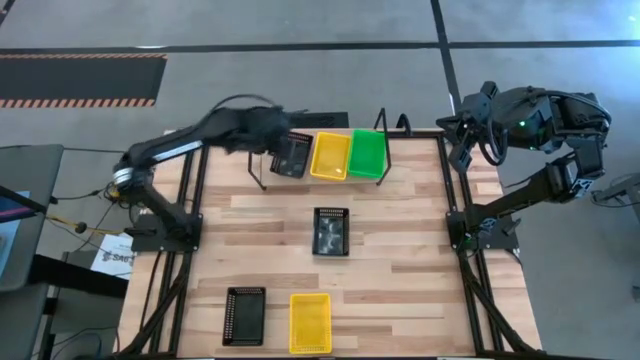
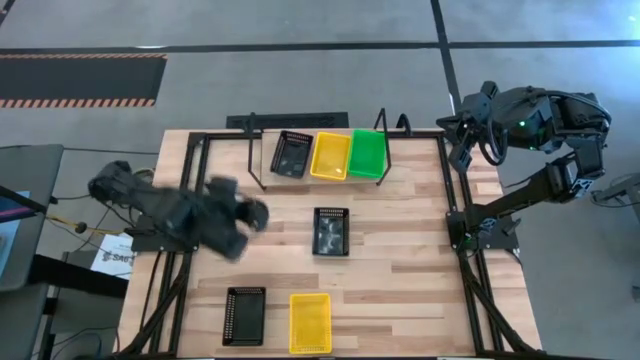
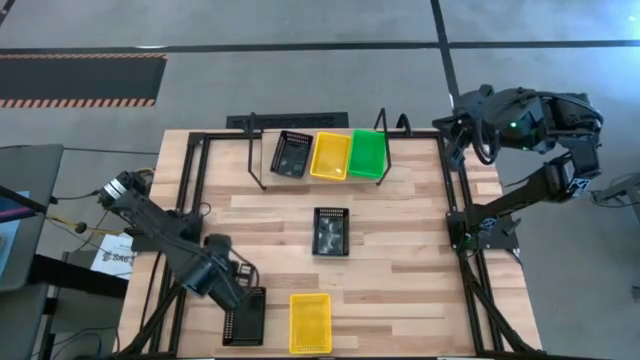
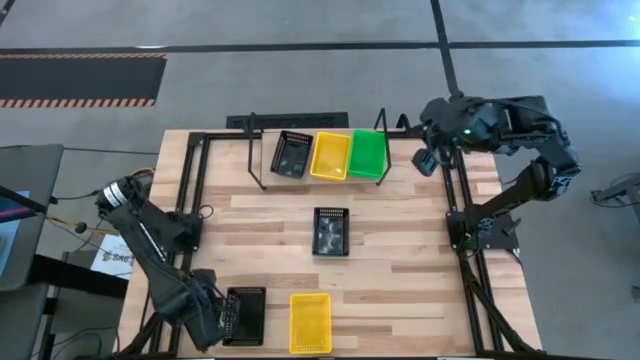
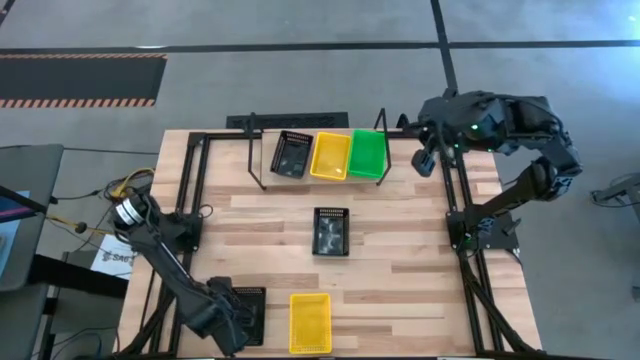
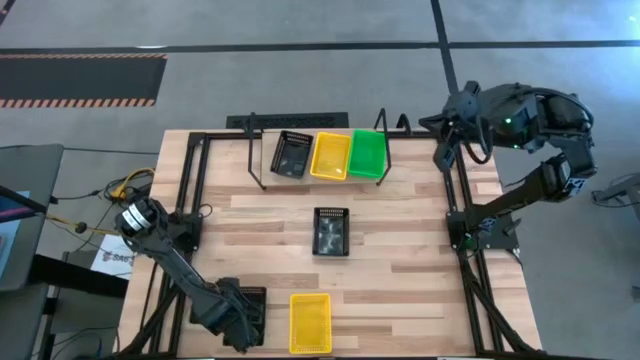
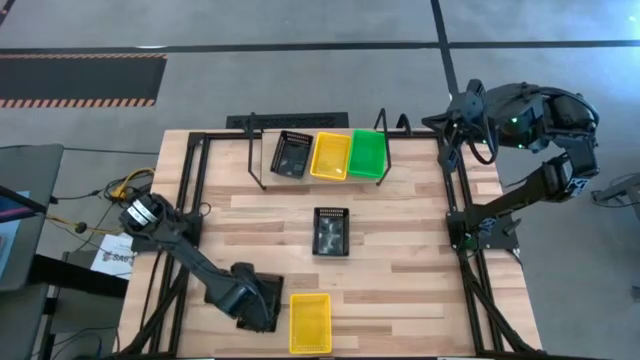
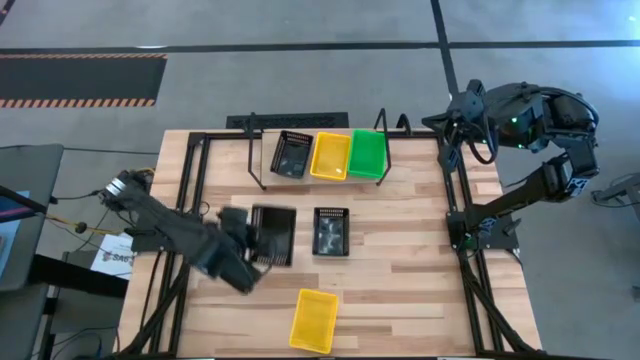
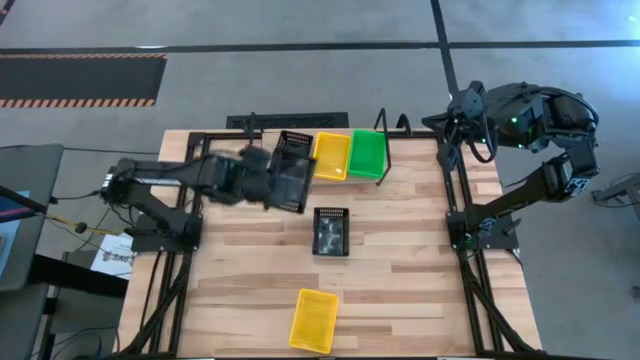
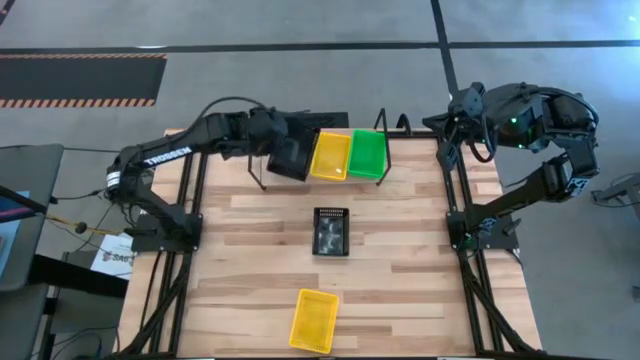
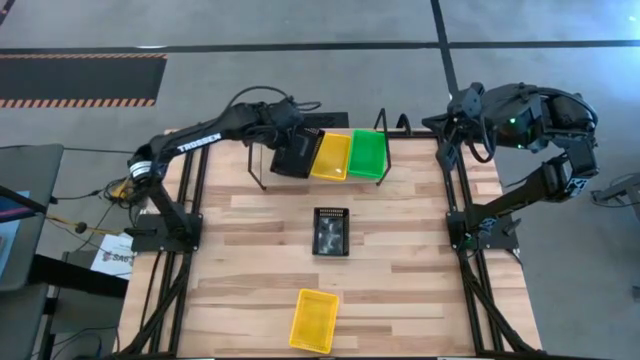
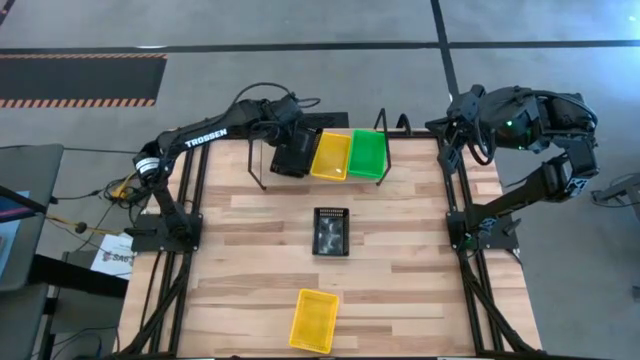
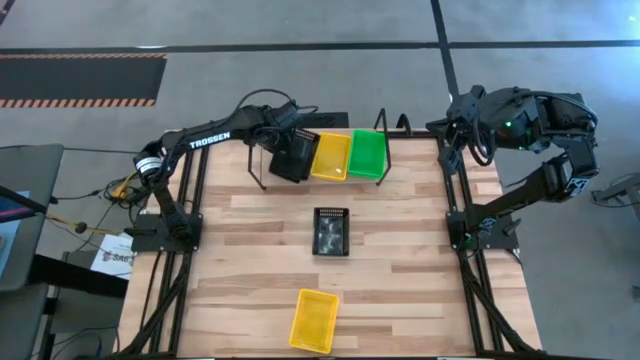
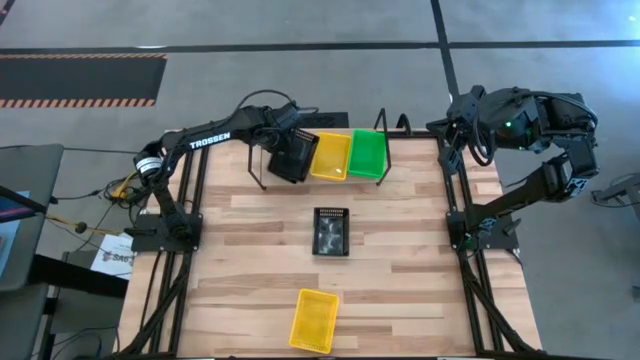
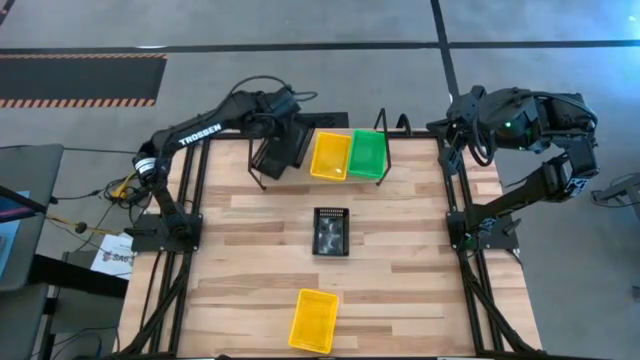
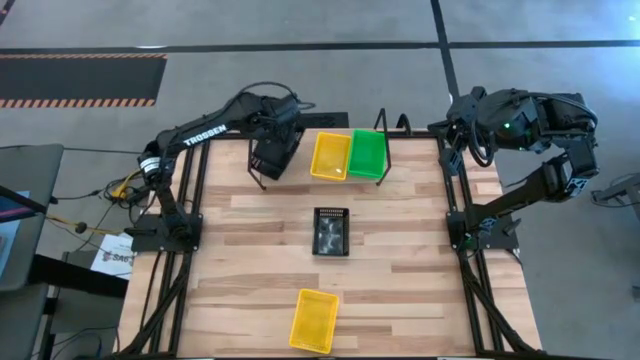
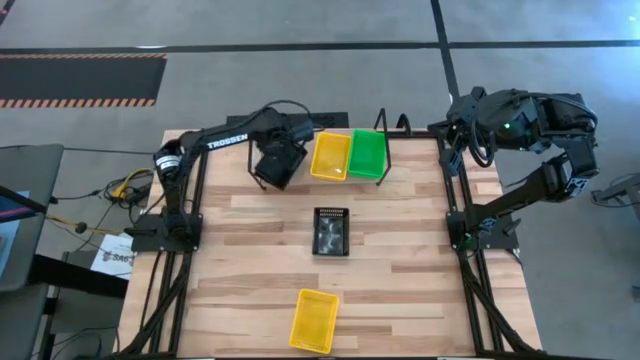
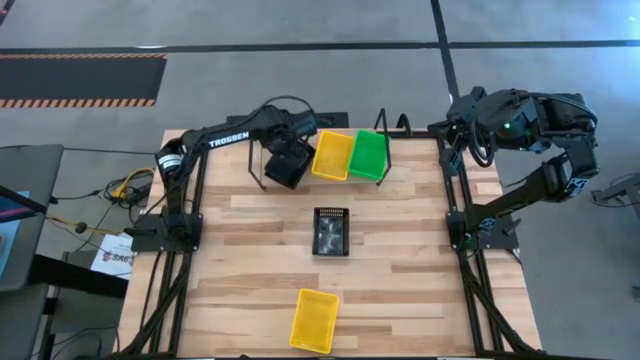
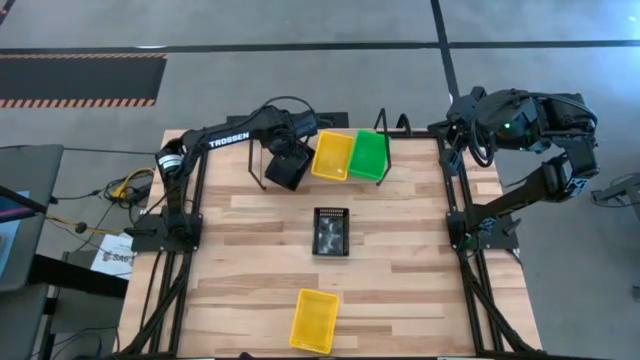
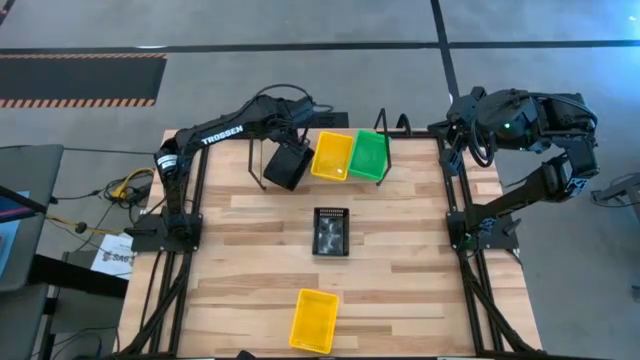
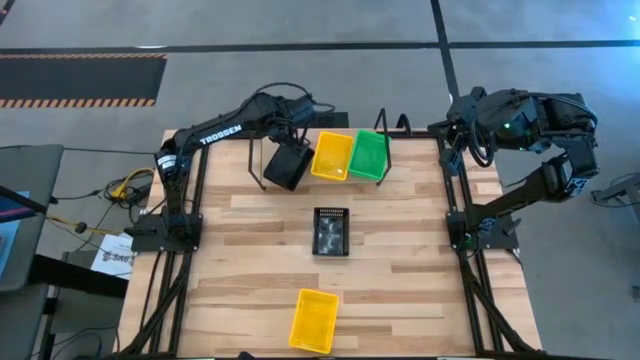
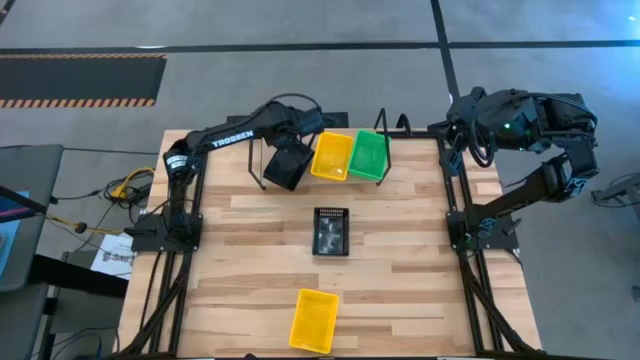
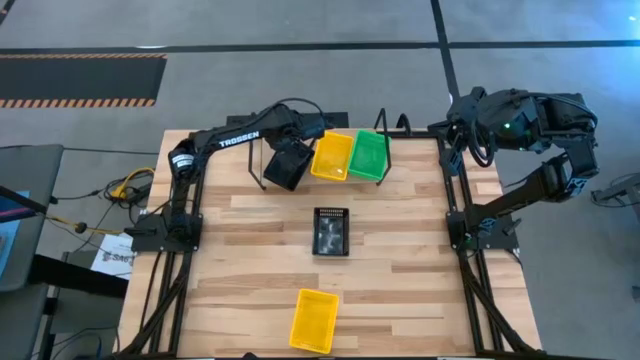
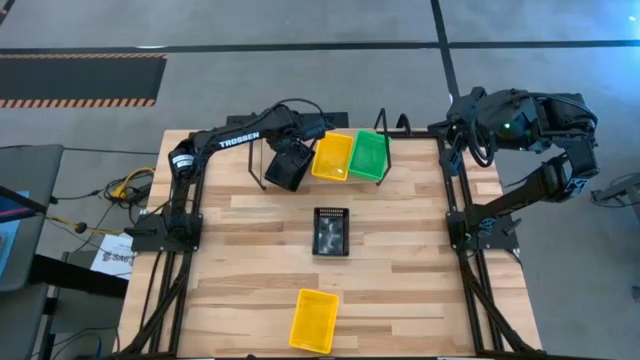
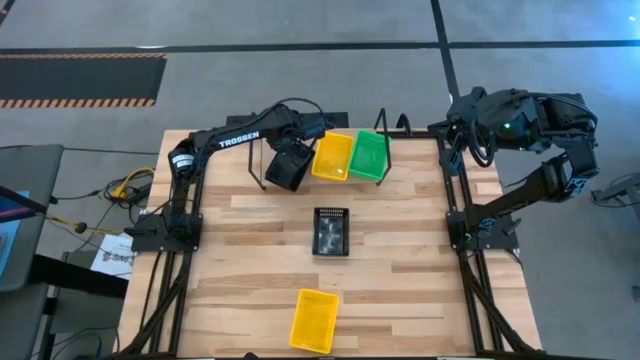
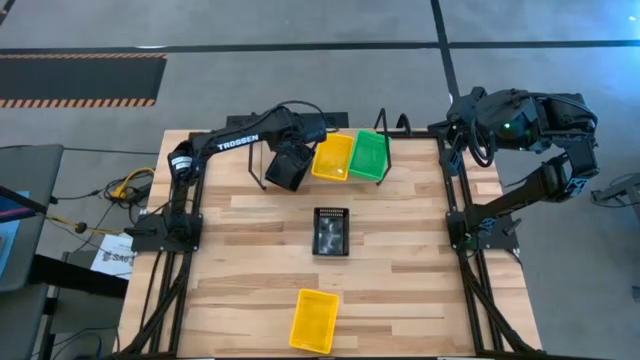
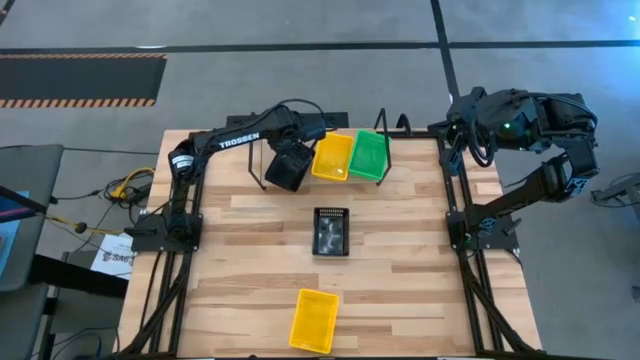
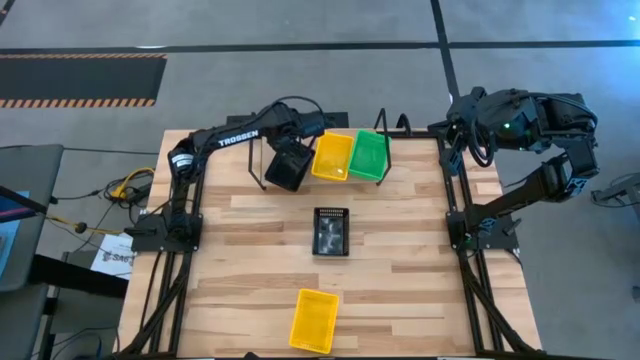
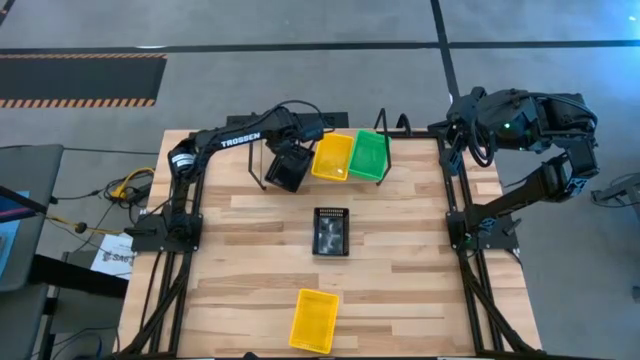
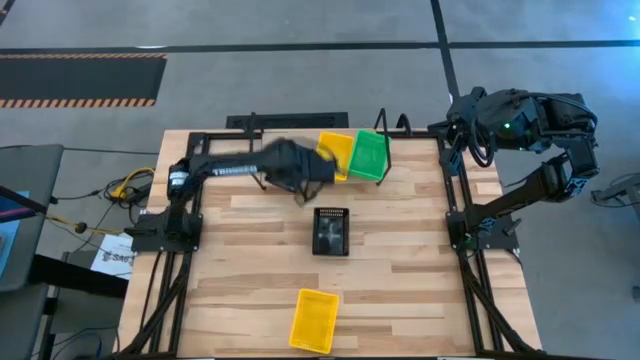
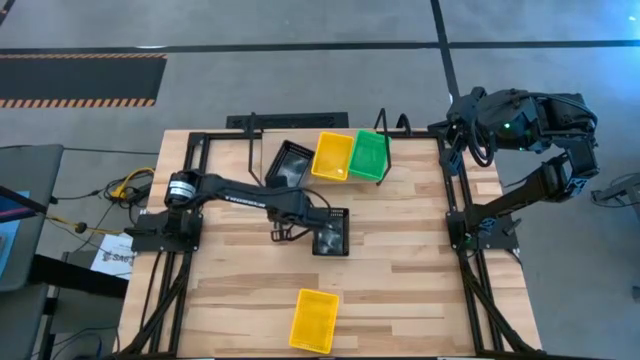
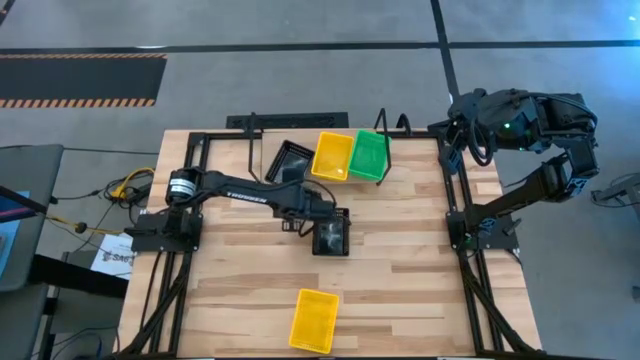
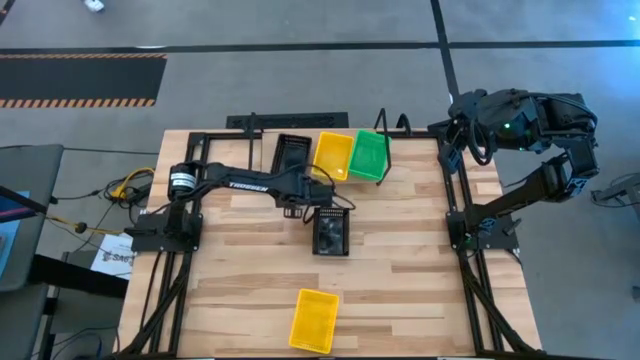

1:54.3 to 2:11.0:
Task: Stack baskets on shelf by color
Stack the bottom black bin on the black bin on the shelf

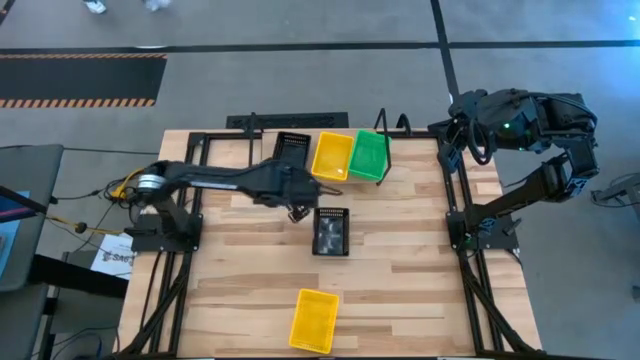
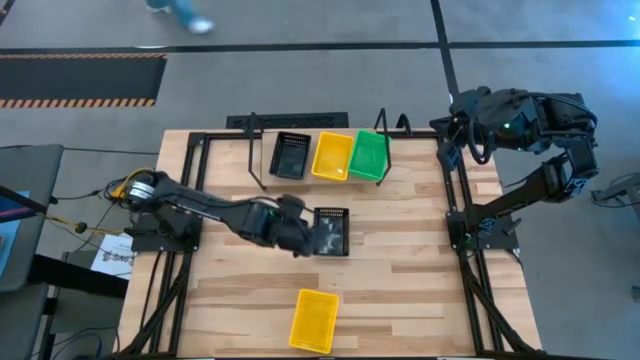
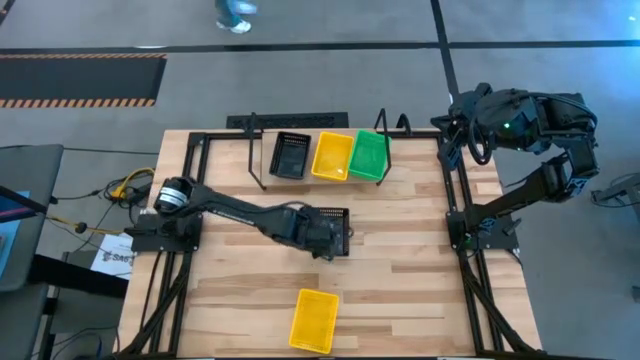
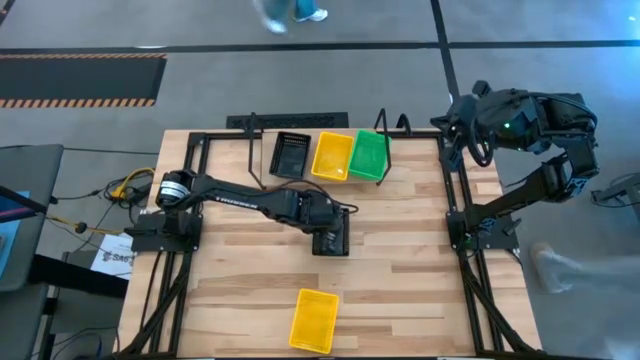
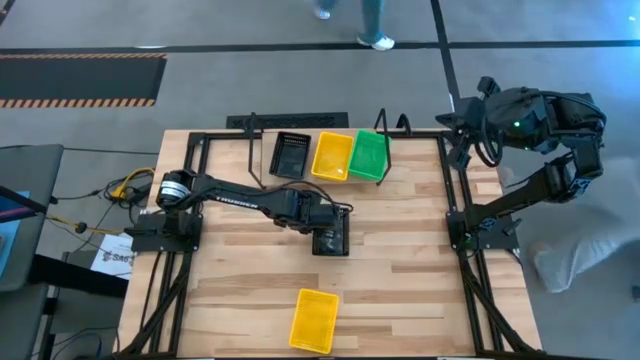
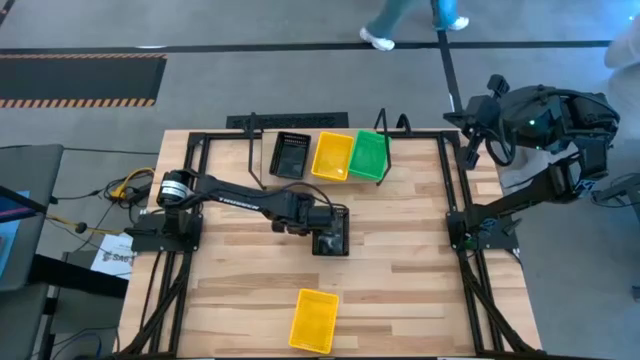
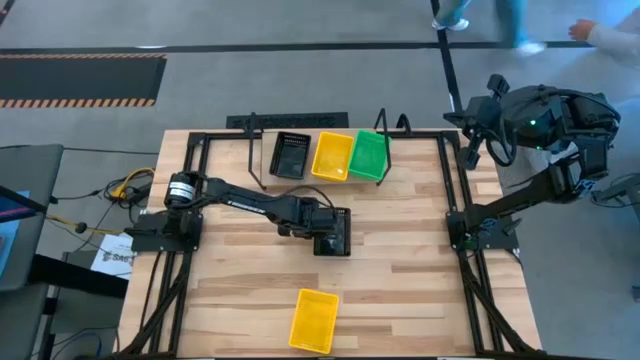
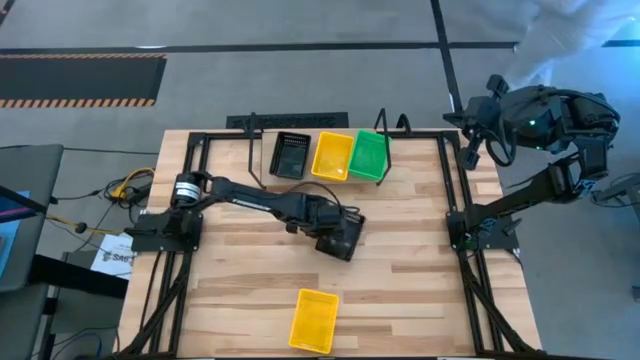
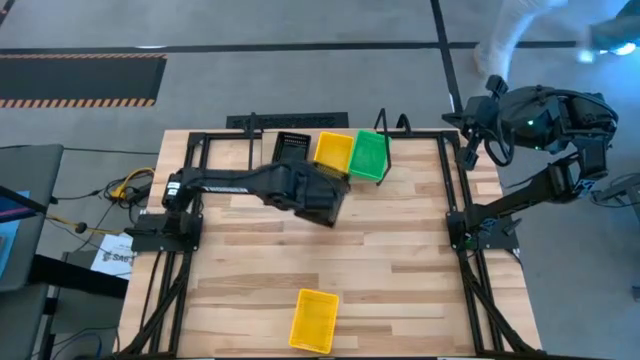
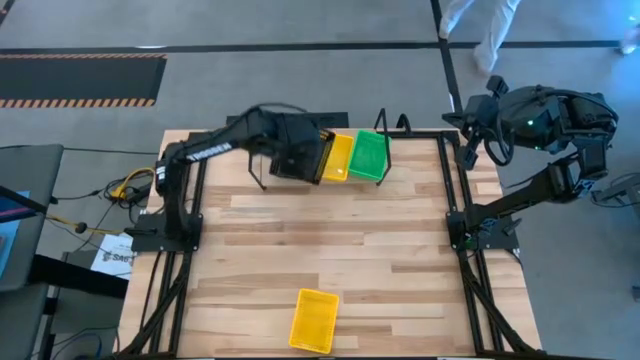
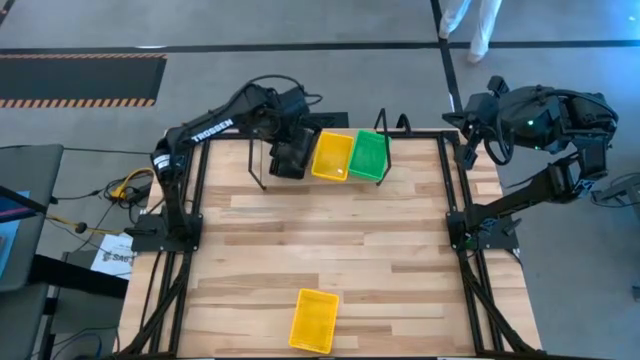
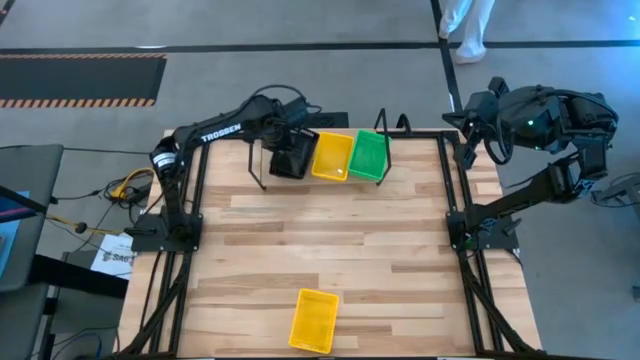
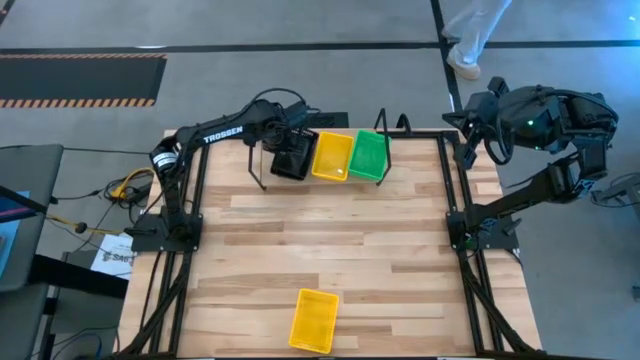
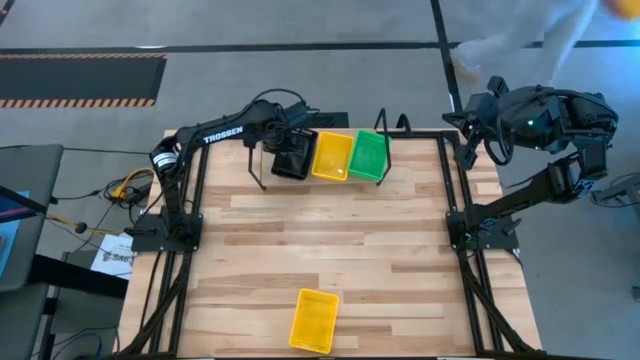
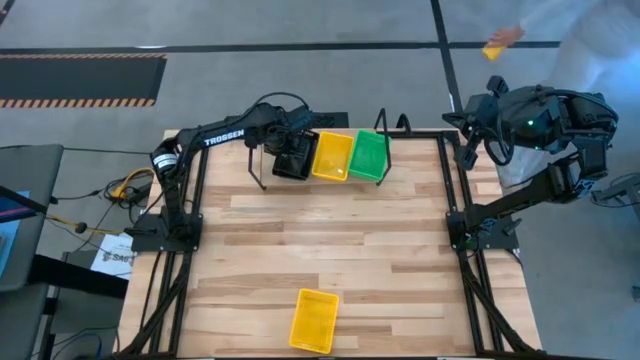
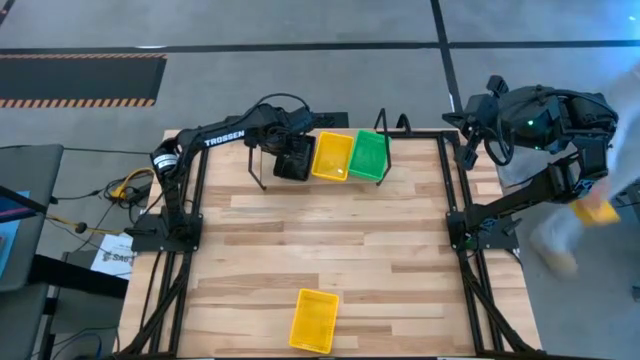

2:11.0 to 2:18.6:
Stack the black bin on the black bin on the shelf
